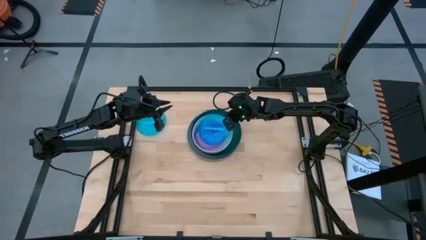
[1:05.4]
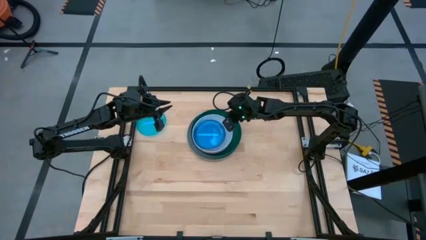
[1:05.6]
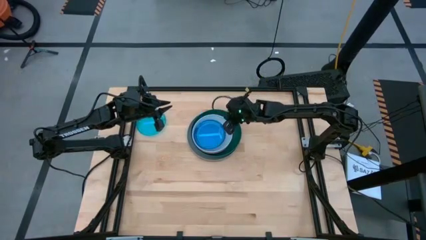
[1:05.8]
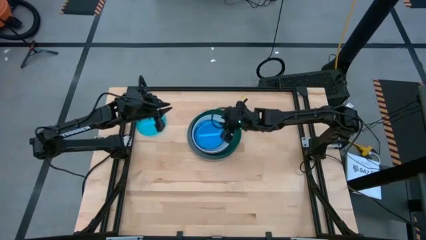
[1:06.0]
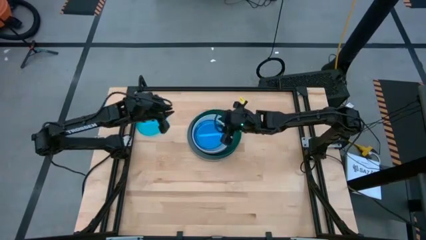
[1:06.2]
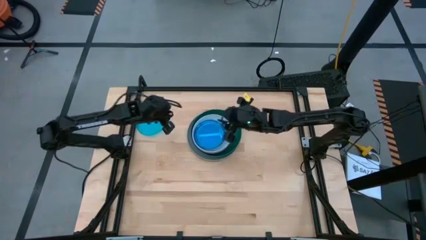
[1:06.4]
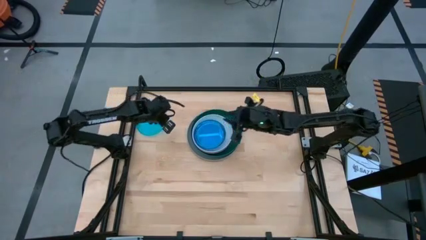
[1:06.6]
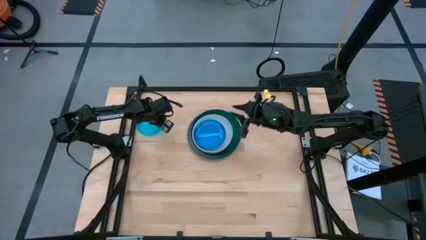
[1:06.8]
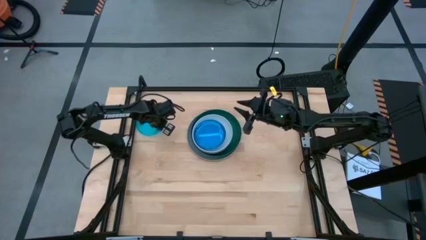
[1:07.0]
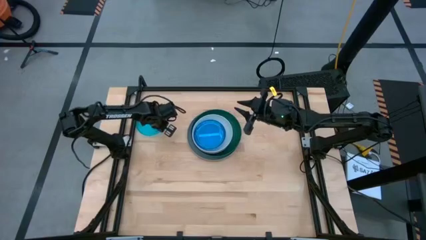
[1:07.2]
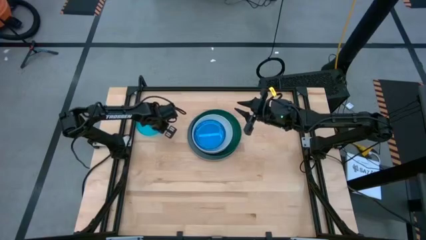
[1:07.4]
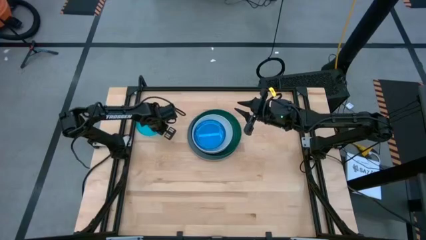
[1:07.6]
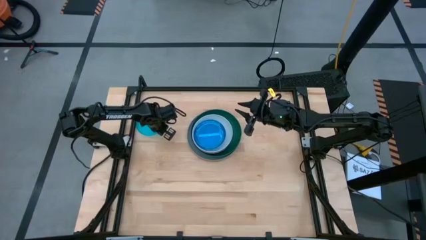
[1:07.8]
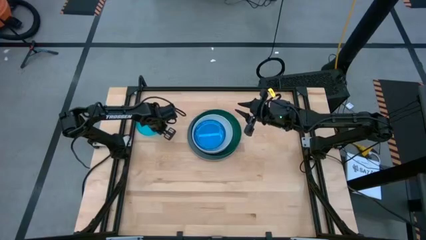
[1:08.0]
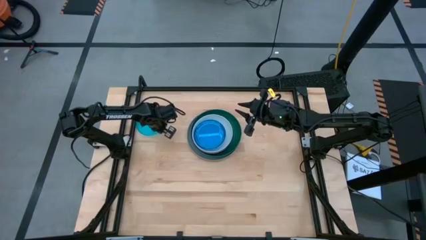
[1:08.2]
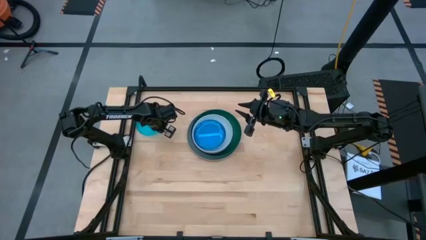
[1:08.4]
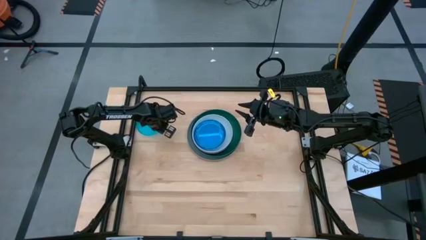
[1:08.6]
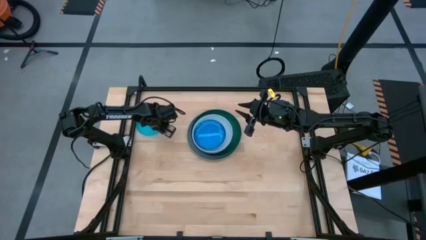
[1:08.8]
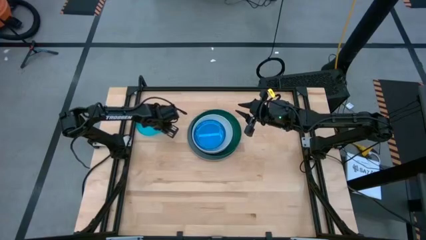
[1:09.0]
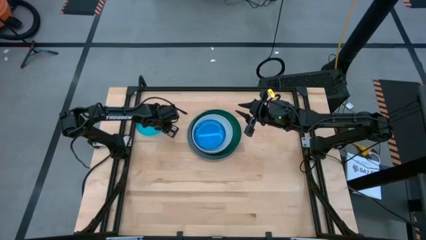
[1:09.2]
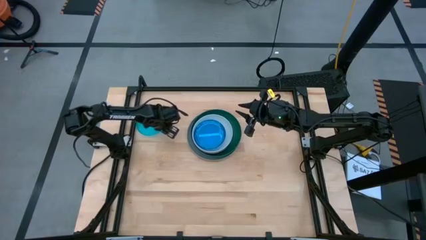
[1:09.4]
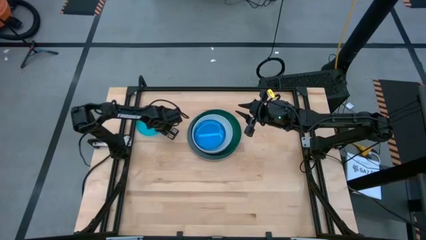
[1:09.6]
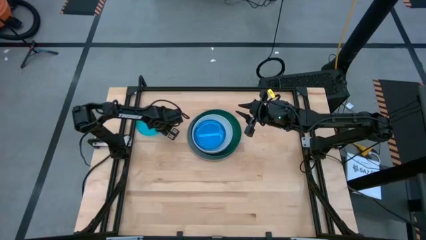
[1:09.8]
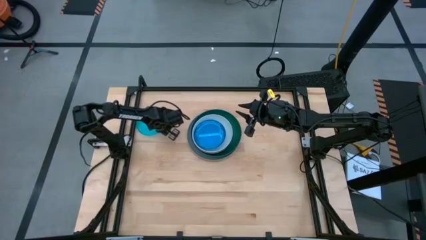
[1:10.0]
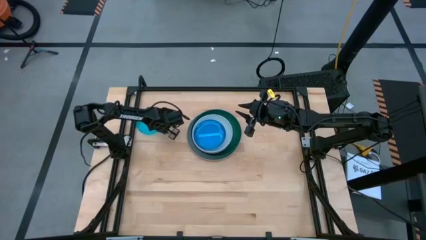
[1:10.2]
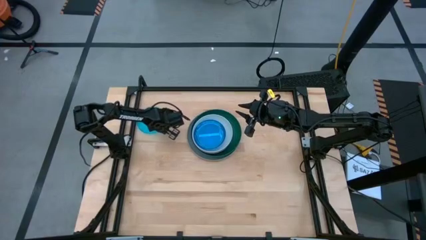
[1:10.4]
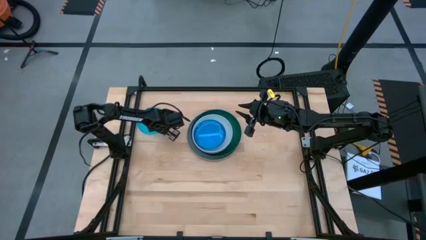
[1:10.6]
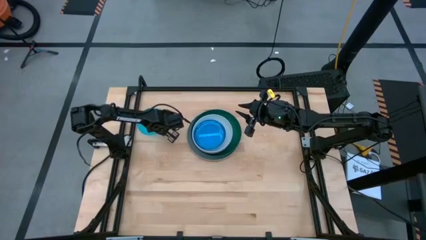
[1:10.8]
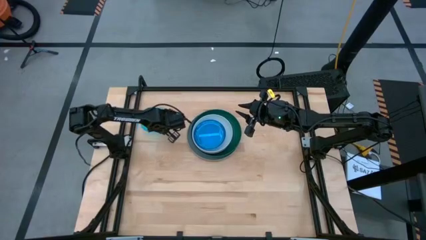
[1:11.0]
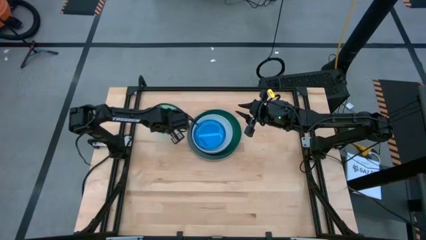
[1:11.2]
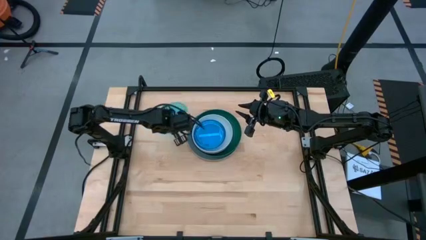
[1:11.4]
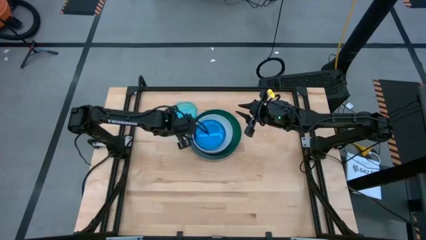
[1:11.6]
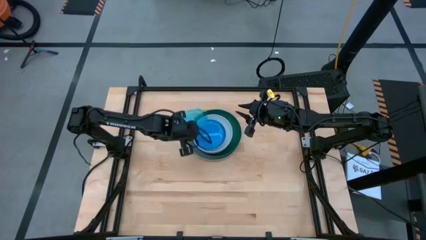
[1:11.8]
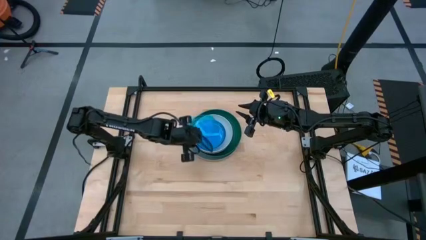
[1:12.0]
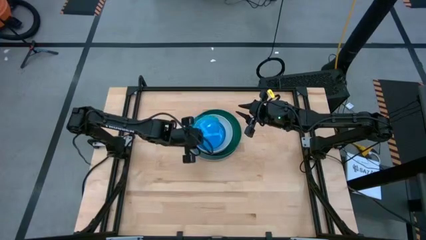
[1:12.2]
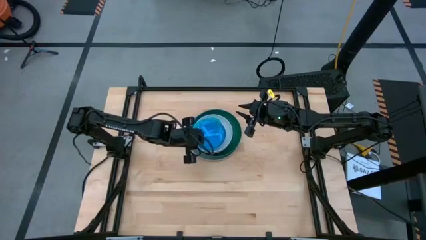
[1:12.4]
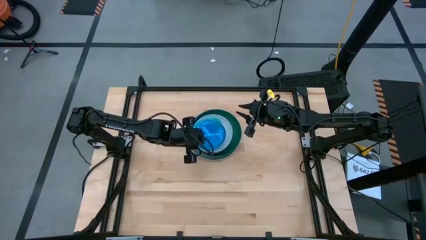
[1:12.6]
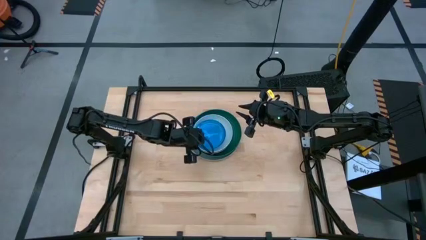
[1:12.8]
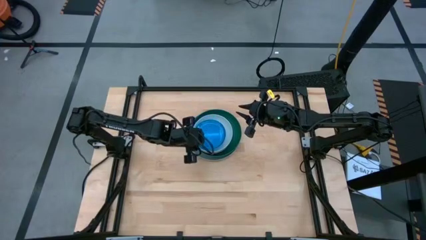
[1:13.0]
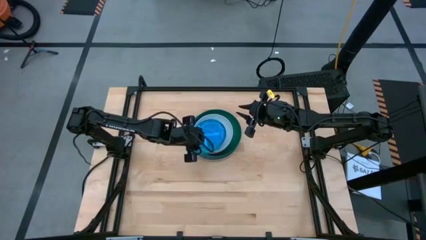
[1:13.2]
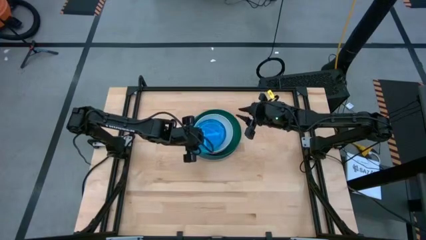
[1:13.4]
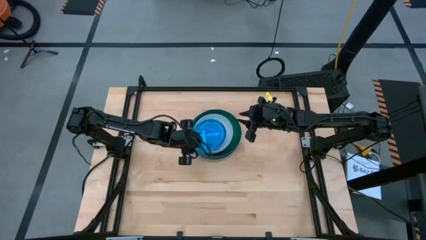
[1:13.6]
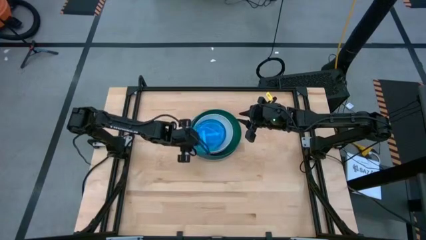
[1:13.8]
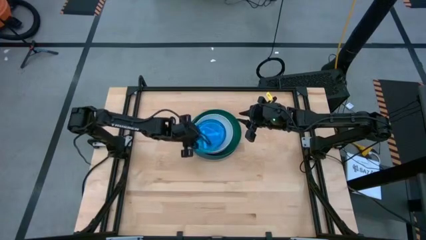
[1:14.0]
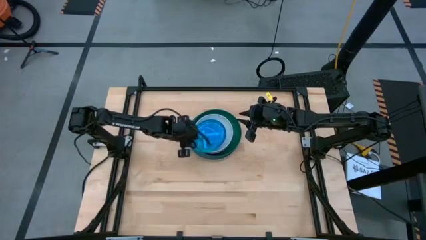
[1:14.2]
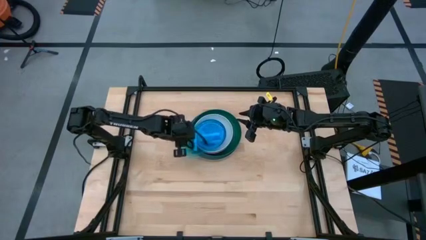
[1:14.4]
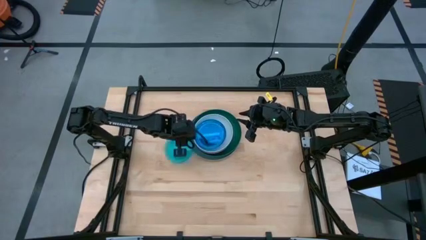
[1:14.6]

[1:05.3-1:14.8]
Task: Stack plastic plates
Stack the blue transparent plate on top of the blue transparent plate

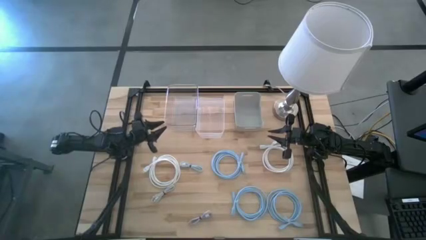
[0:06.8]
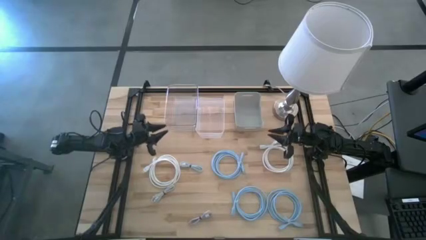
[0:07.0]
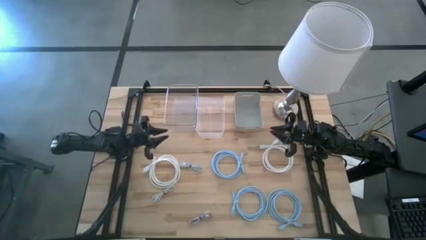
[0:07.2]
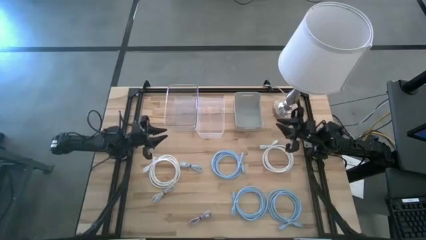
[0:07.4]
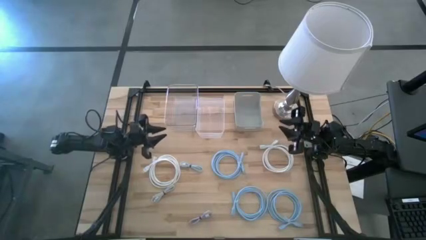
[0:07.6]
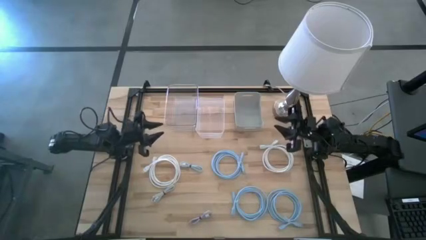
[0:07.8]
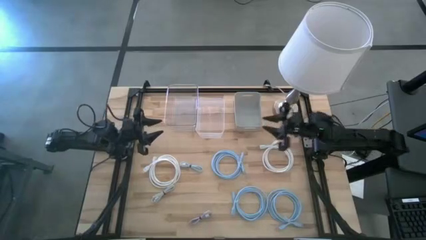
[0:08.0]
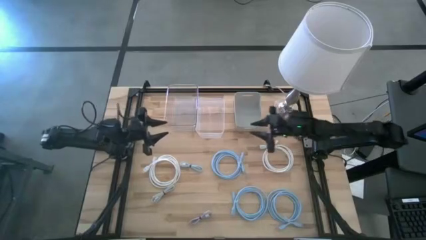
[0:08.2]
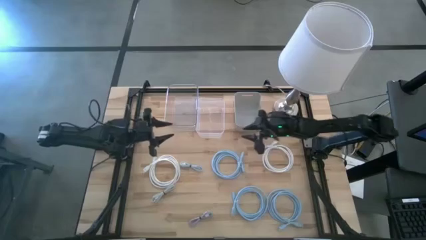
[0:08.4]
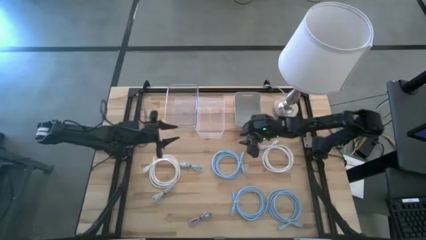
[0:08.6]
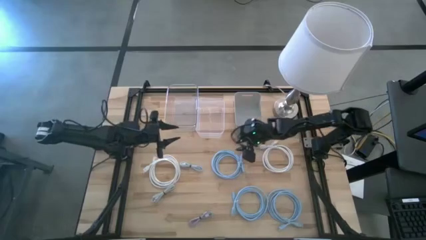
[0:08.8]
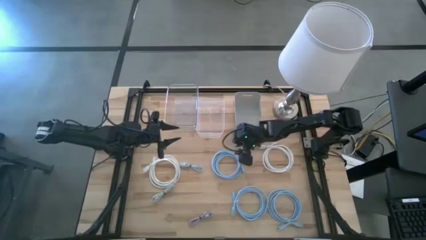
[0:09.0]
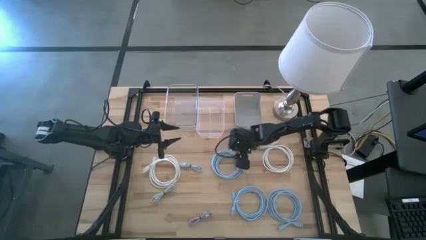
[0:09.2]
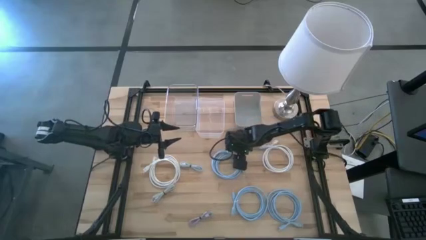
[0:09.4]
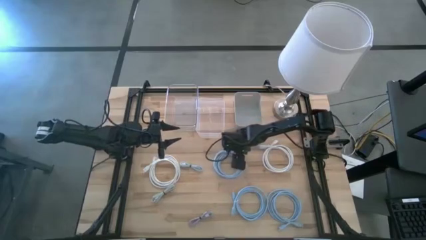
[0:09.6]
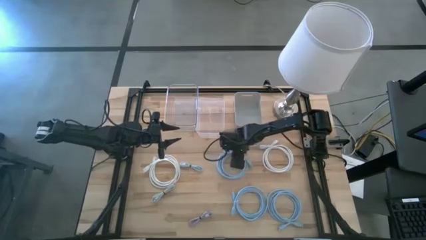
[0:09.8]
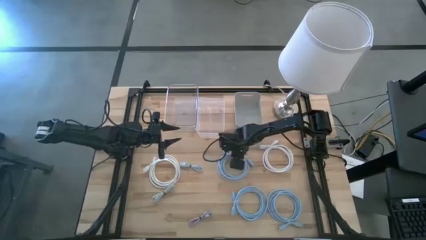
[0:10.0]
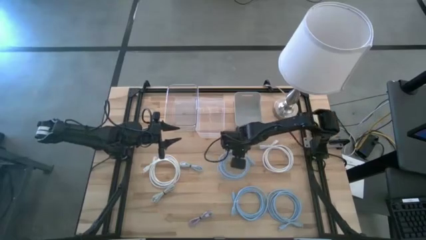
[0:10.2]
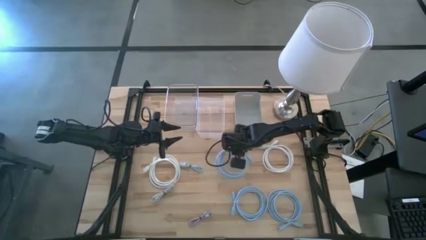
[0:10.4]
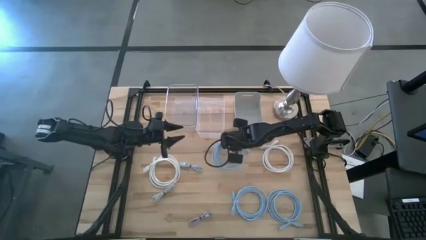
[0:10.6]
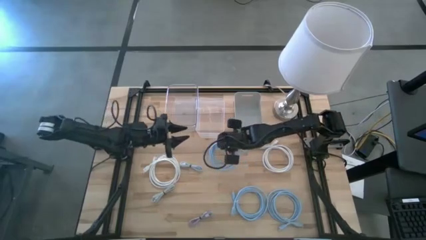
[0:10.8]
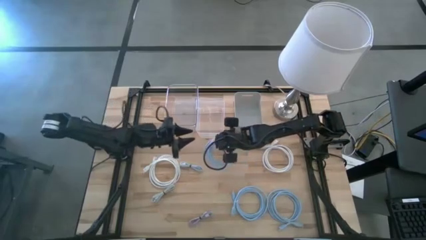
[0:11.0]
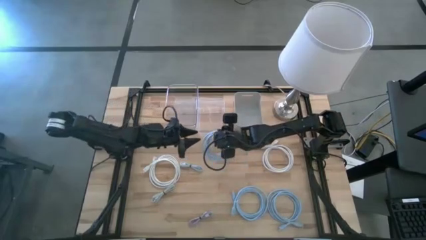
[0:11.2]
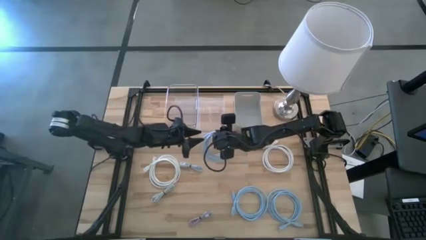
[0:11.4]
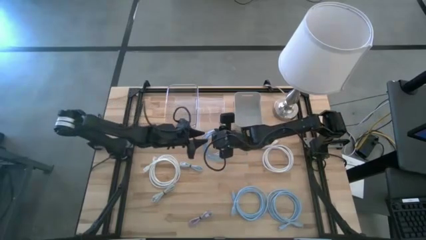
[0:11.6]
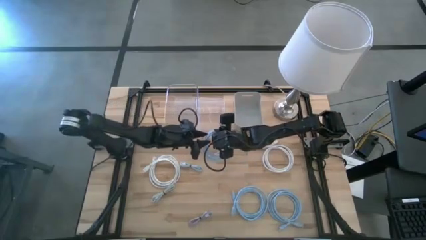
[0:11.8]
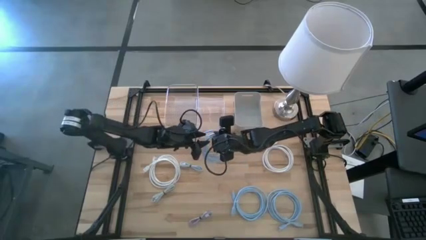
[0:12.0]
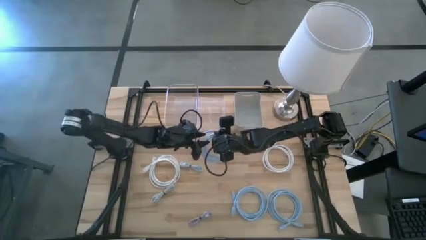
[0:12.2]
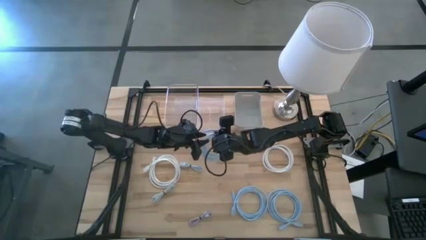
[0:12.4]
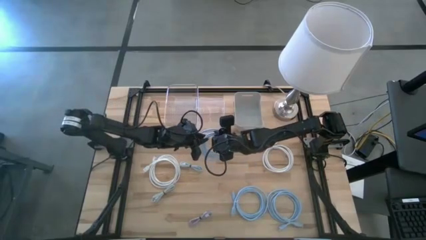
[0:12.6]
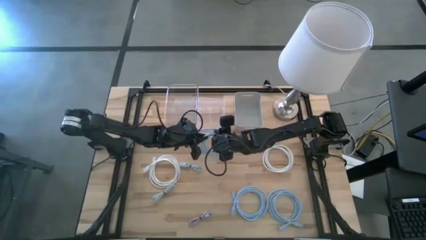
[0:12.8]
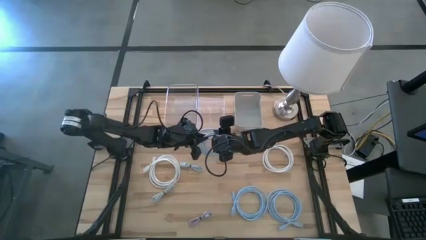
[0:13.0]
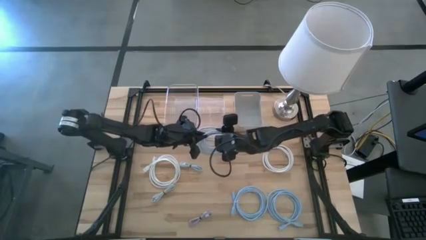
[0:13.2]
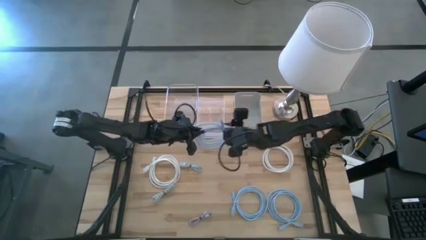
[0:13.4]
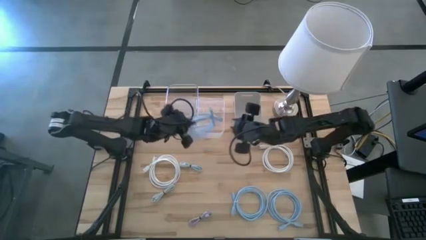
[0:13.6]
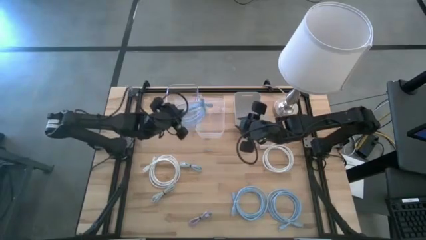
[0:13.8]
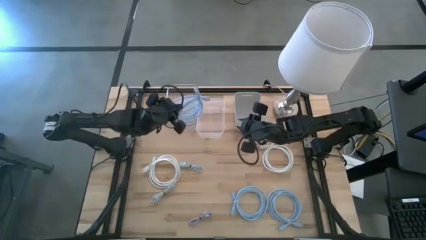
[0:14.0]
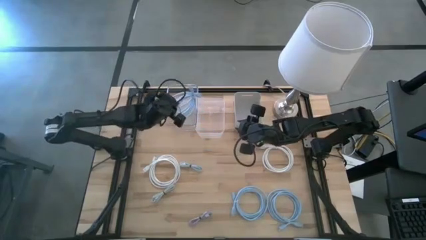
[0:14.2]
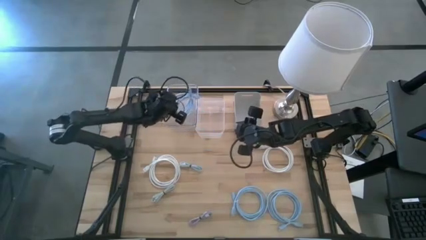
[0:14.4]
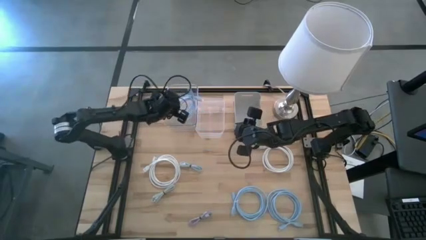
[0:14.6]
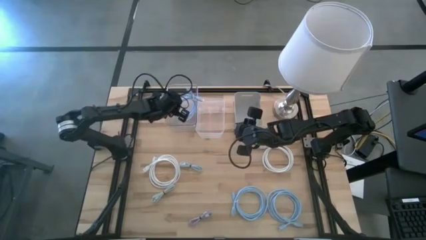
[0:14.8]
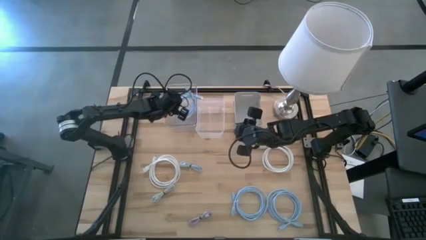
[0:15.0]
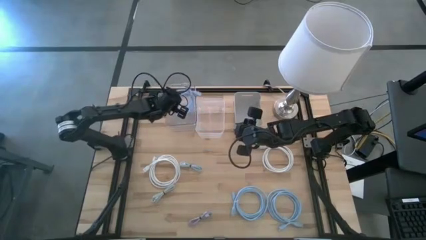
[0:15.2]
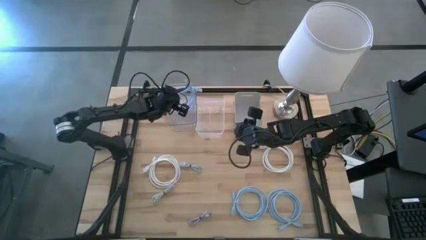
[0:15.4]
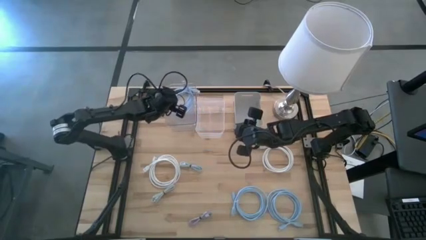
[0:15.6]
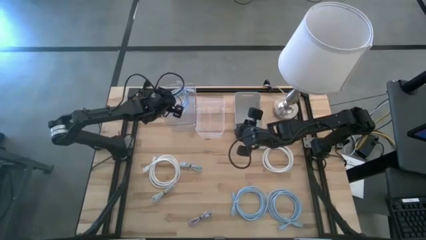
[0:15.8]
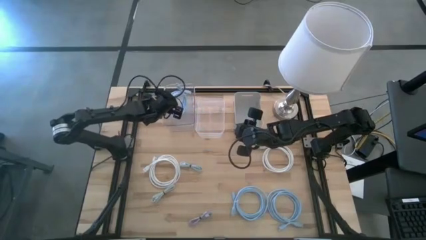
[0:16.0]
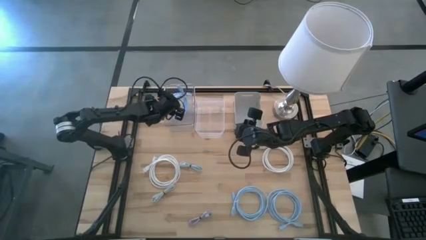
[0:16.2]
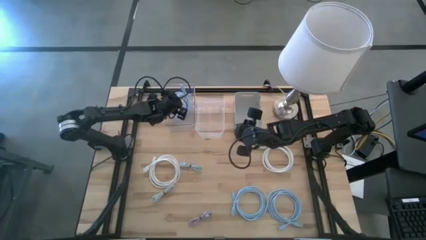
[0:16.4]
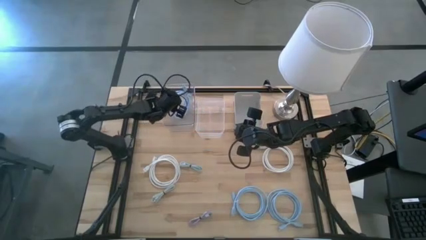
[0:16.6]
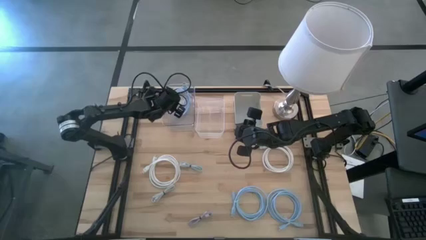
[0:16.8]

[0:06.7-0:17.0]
Task: Pick & Place USB Port
Put the top blue hdmi cable into the left transparent bin
